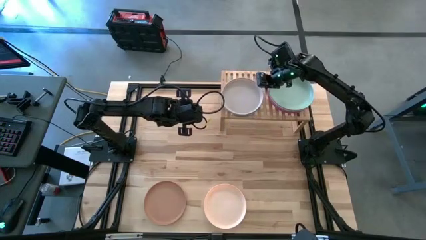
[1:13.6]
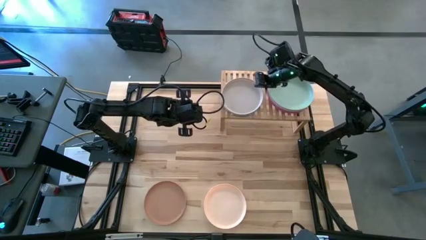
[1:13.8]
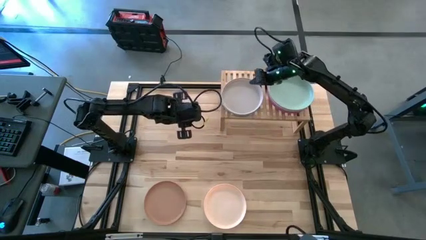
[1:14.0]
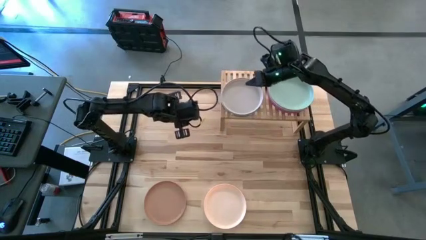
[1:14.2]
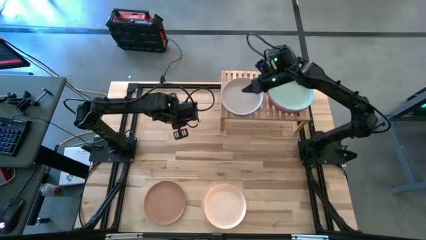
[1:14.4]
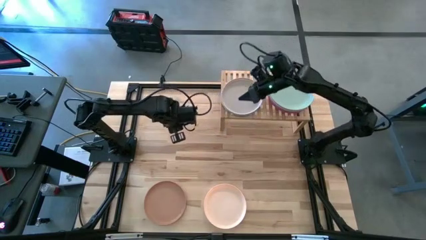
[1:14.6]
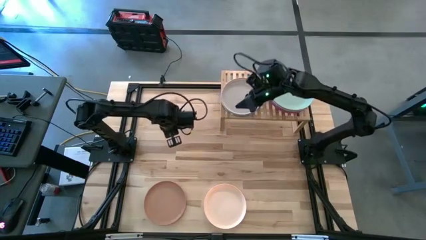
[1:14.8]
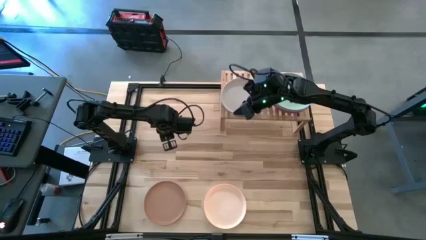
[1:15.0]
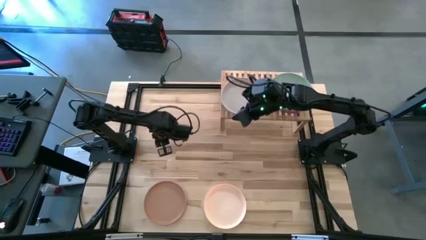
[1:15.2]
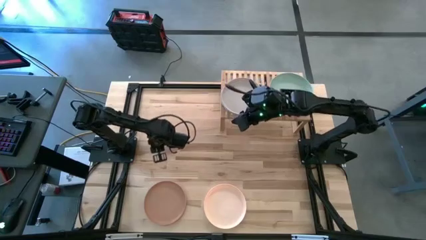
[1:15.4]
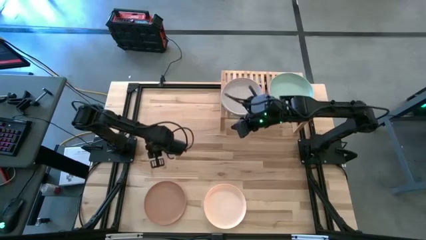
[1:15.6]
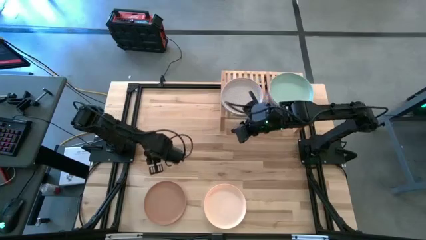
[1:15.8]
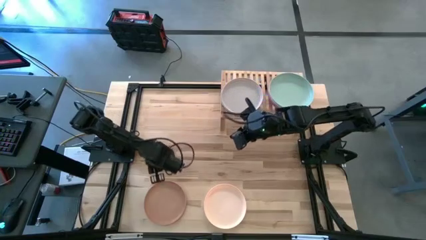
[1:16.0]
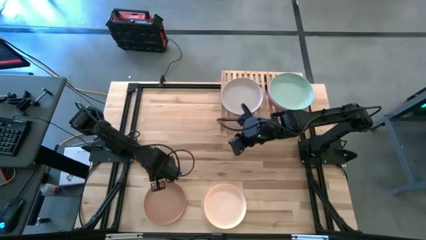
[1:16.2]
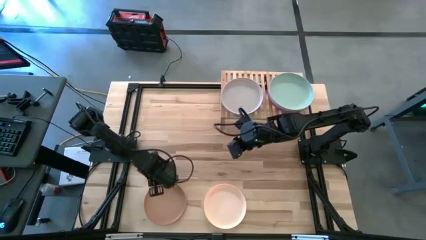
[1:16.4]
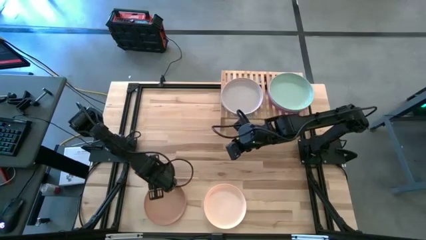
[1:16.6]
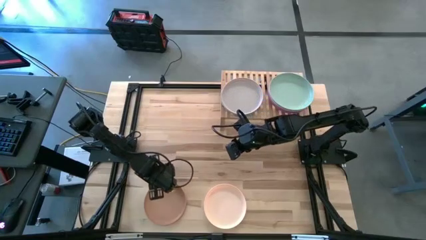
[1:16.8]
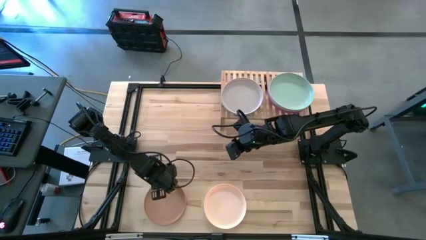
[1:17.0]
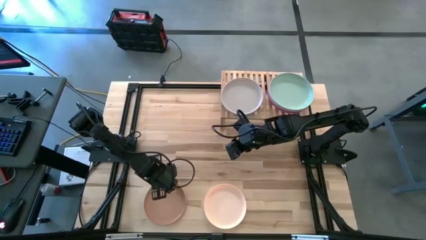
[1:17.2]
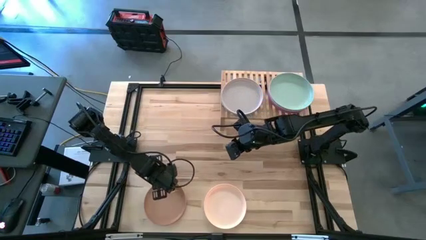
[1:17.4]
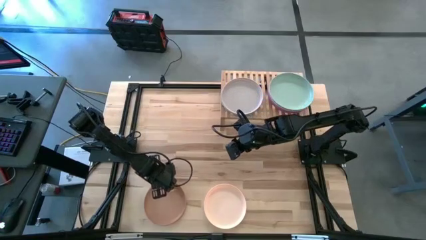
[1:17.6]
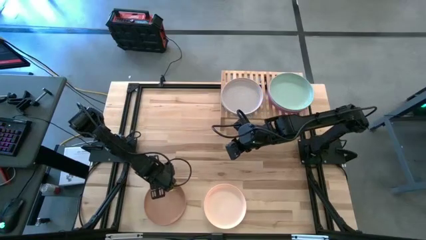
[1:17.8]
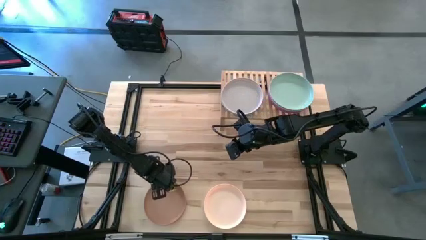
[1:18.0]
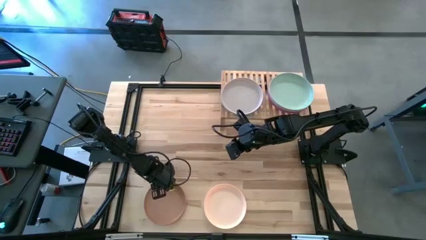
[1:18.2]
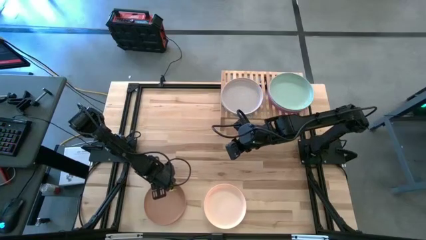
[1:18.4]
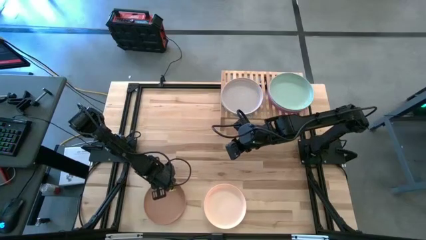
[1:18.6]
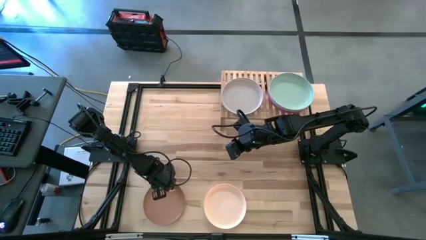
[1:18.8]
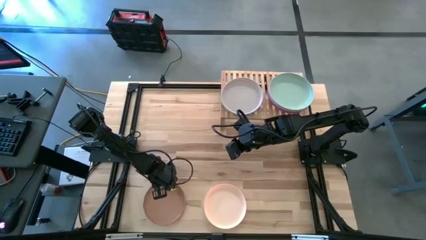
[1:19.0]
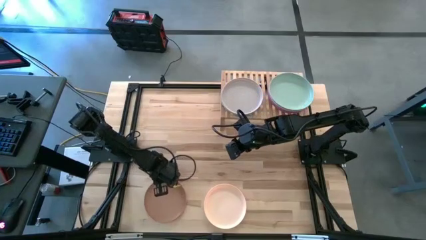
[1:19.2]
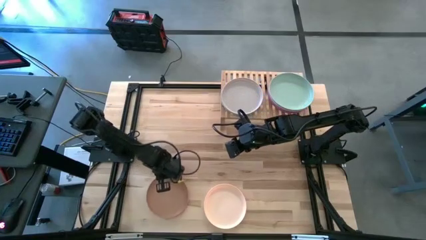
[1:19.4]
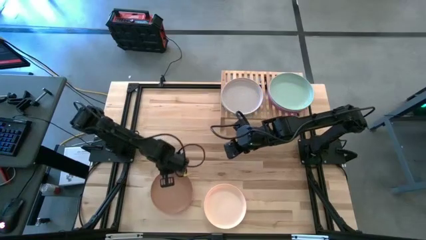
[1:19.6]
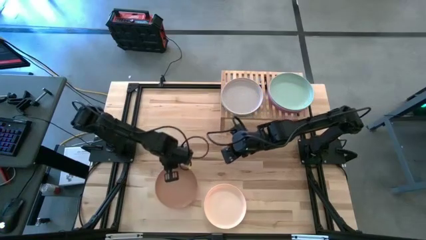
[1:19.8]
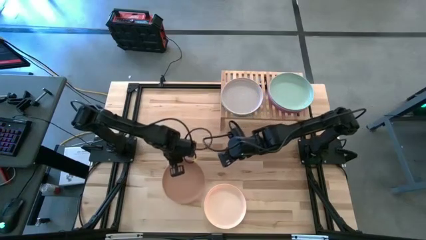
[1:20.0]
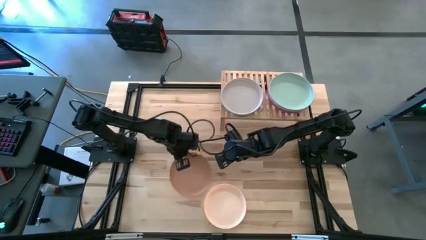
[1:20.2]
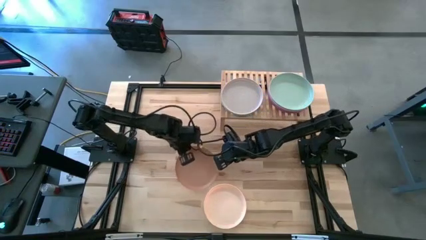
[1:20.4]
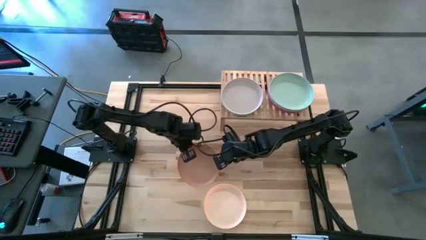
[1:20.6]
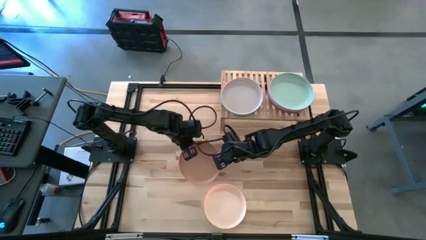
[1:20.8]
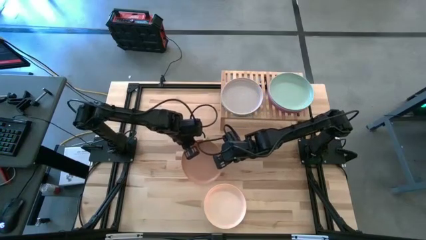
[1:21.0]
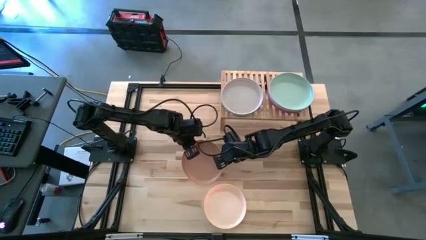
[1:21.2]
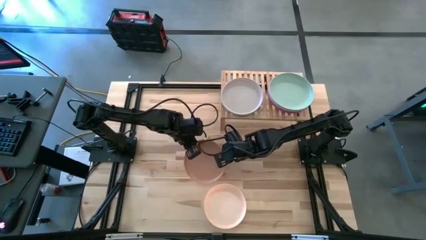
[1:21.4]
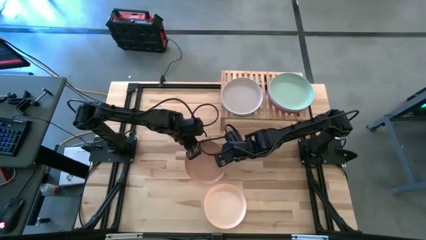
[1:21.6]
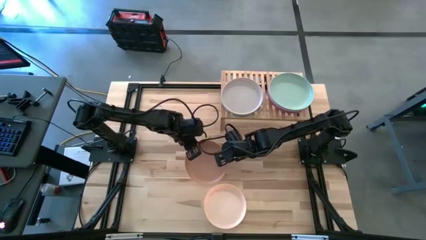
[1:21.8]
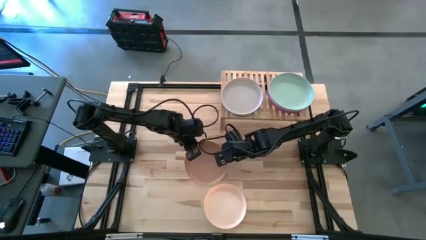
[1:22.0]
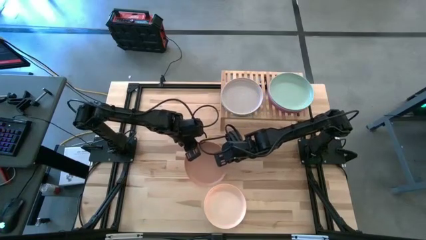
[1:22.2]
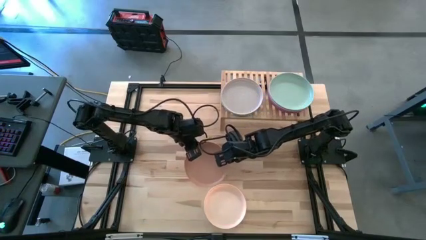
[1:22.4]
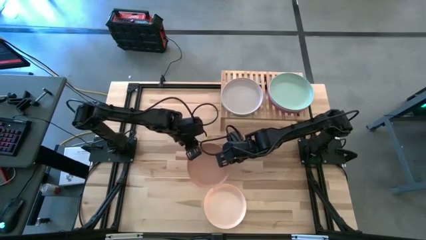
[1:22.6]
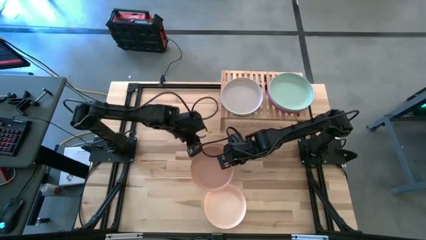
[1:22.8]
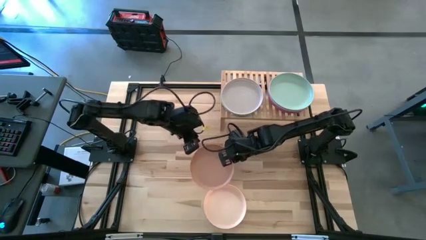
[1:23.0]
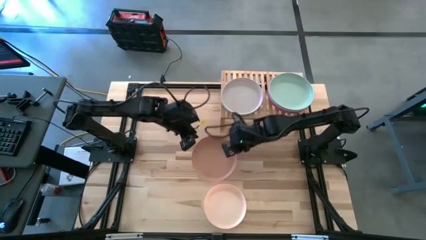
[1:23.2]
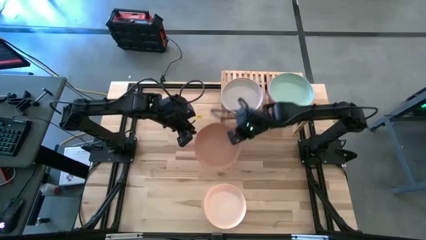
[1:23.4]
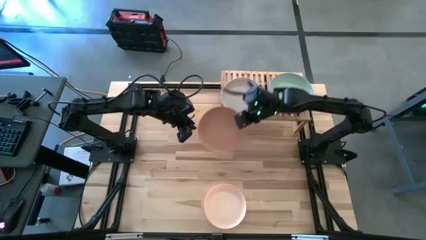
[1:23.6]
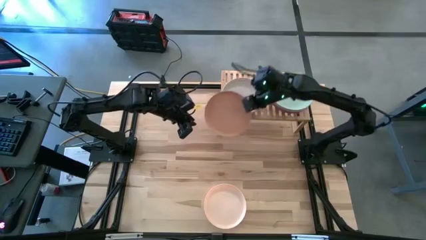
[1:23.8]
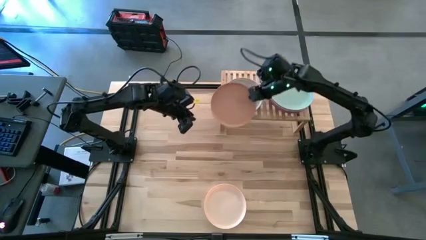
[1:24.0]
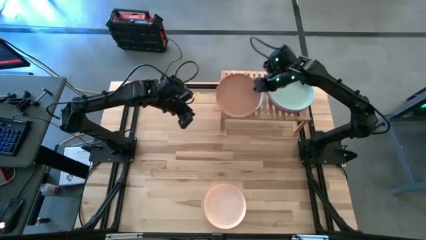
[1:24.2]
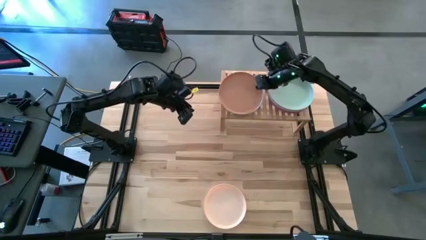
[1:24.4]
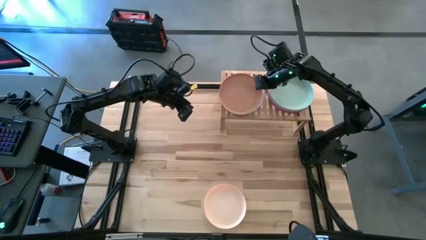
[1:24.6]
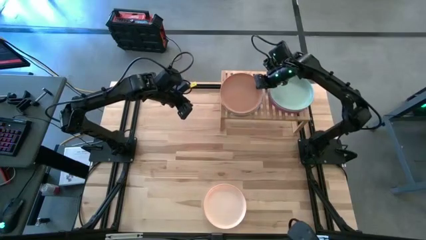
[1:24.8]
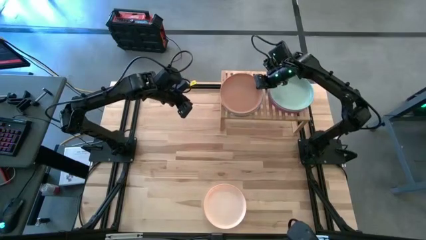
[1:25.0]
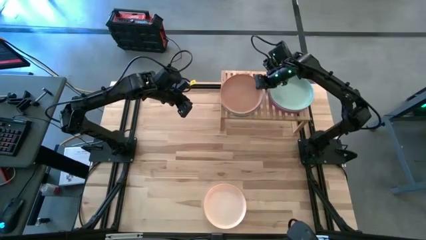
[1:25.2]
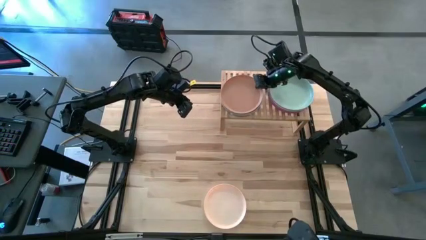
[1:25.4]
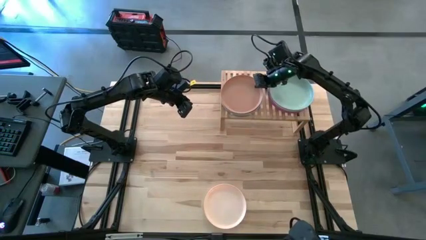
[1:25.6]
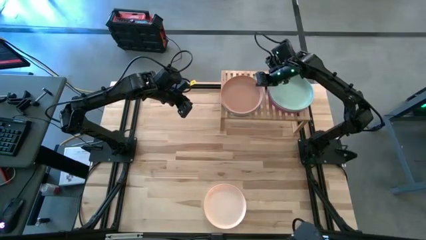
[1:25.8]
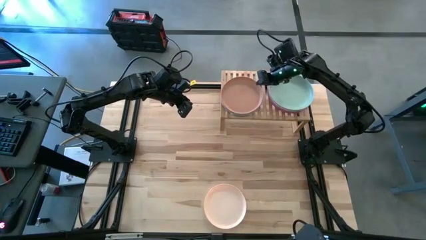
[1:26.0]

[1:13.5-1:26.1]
Task: Place and stack plates onto a shelf
Stack the brown plate on top of the gray plate on the shelf

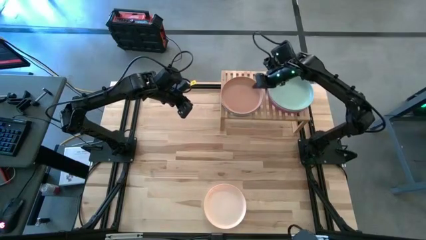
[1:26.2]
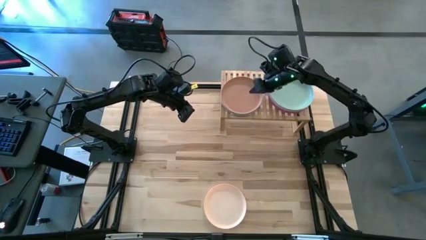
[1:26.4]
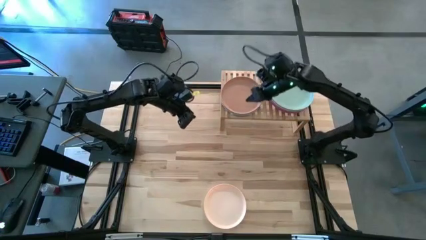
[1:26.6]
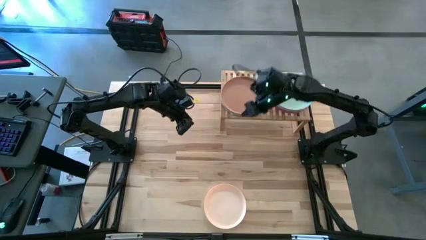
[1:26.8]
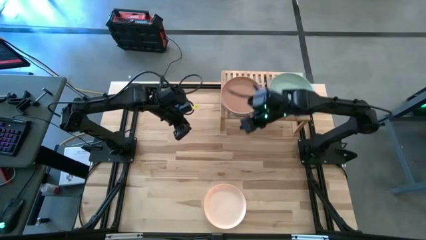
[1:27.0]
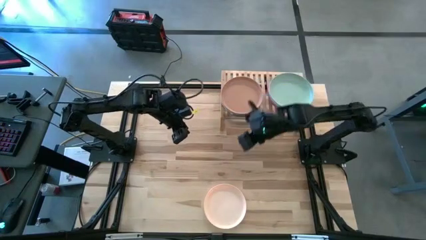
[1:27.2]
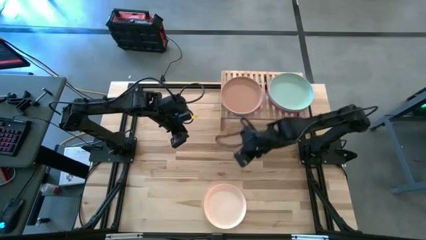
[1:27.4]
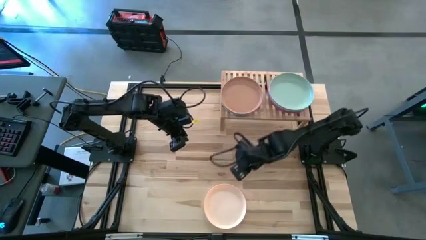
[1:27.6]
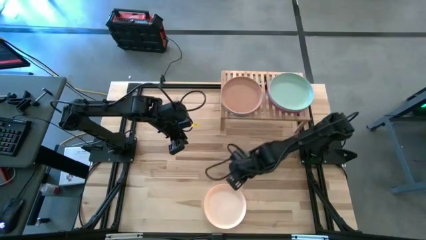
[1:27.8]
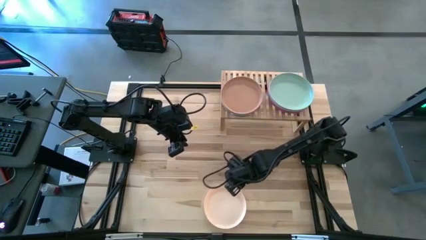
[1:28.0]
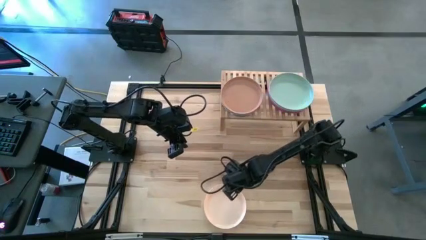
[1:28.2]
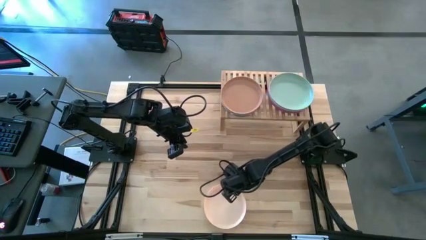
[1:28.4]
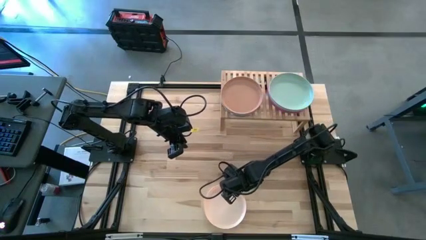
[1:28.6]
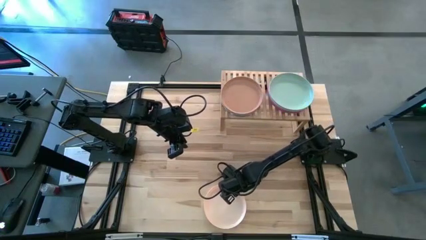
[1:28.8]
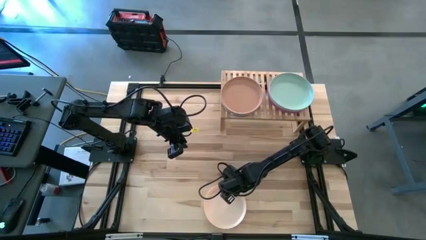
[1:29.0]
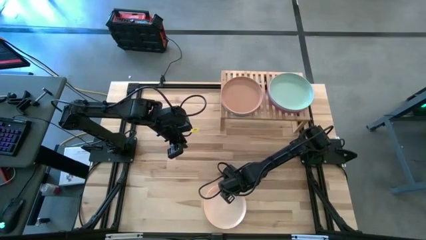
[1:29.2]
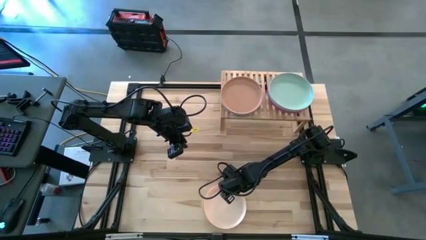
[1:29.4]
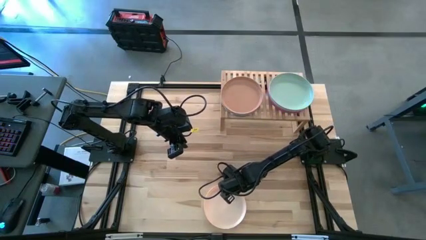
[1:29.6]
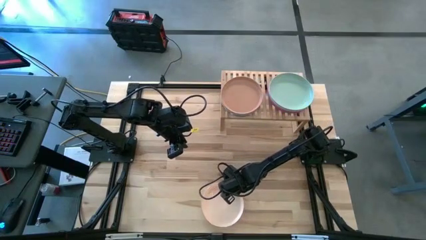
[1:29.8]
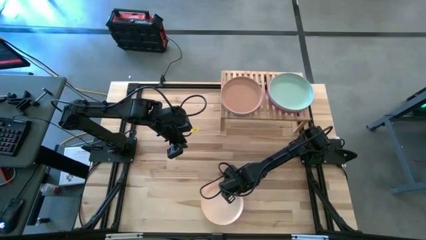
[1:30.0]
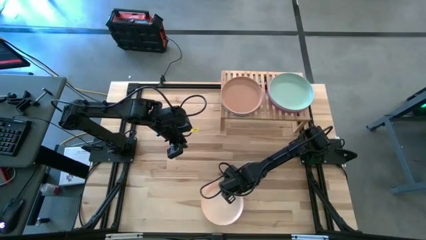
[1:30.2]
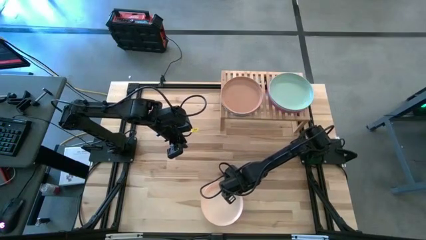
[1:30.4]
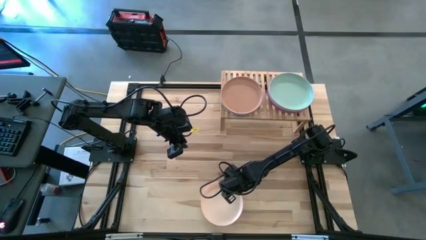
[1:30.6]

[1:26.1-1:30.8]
Stack the light orange plate on top of the brown plate on the shelf
